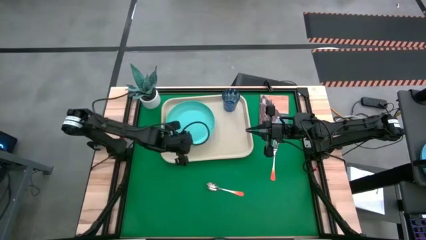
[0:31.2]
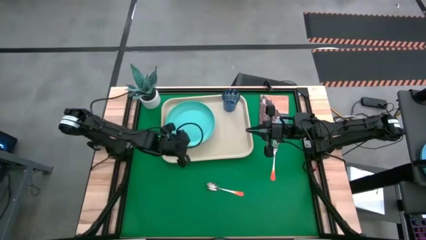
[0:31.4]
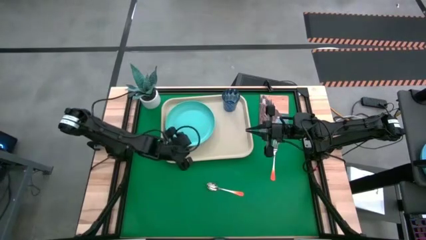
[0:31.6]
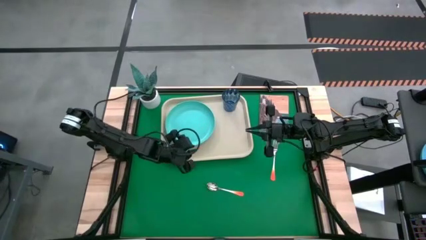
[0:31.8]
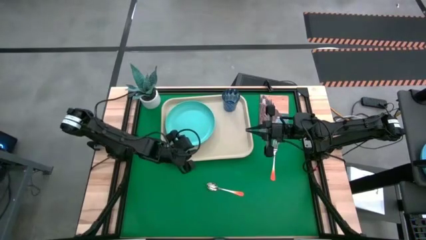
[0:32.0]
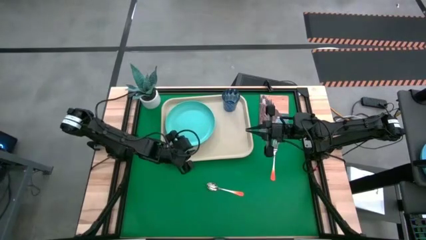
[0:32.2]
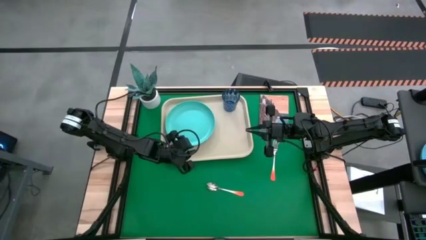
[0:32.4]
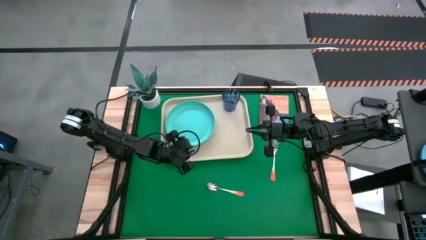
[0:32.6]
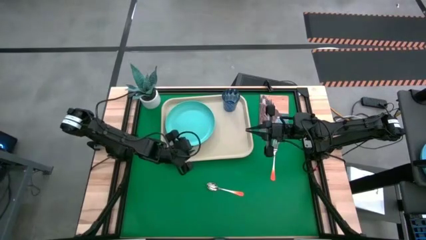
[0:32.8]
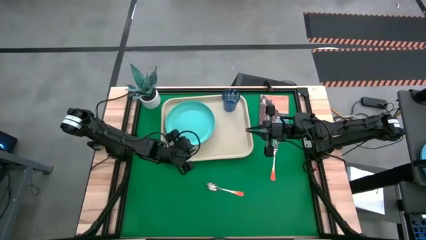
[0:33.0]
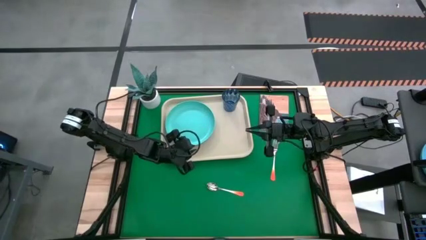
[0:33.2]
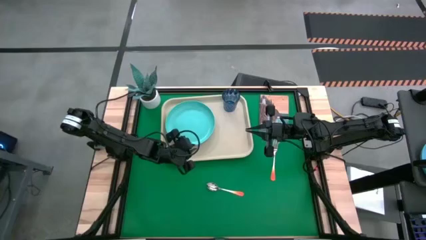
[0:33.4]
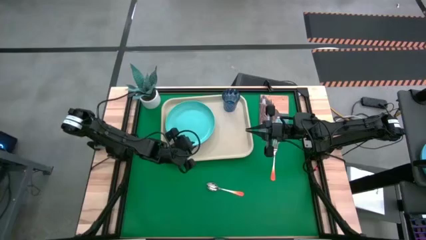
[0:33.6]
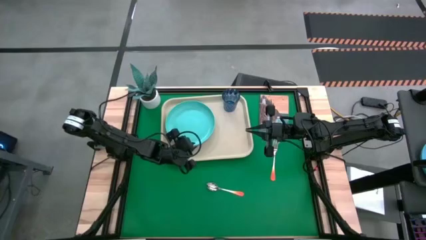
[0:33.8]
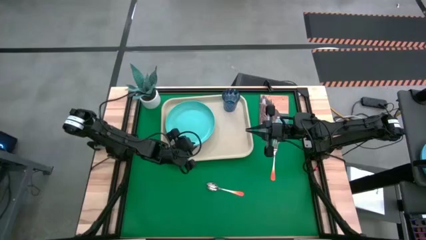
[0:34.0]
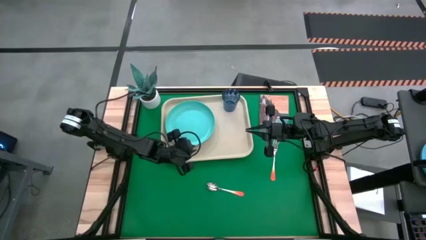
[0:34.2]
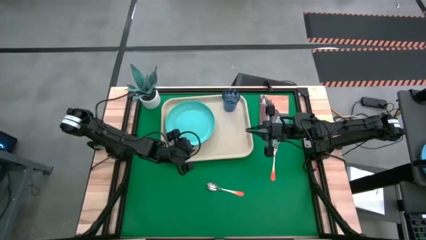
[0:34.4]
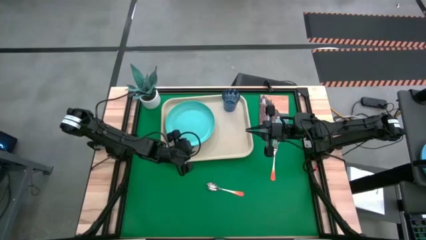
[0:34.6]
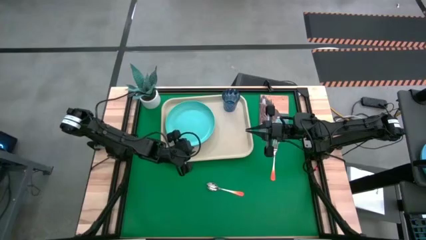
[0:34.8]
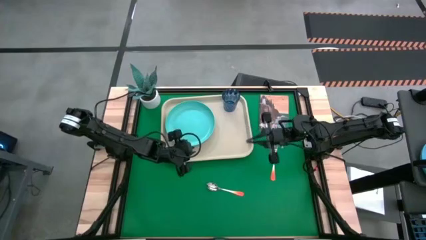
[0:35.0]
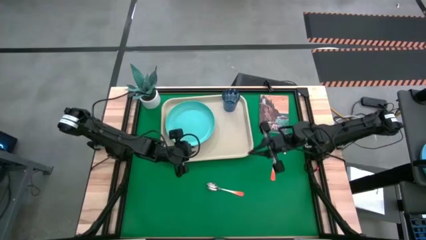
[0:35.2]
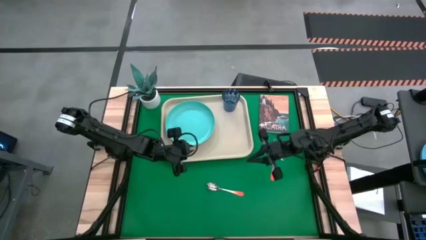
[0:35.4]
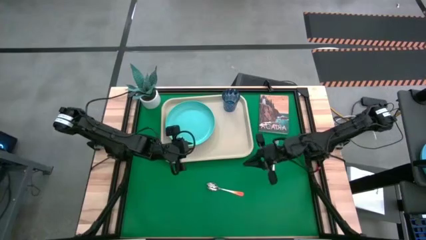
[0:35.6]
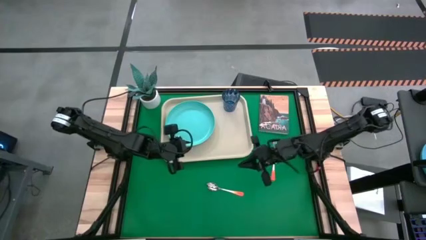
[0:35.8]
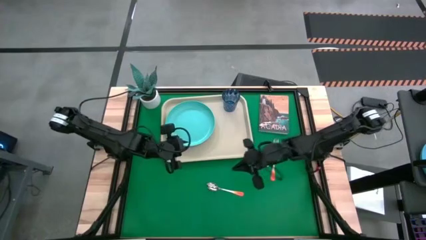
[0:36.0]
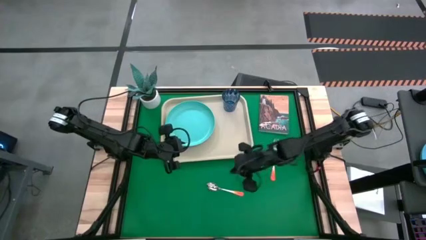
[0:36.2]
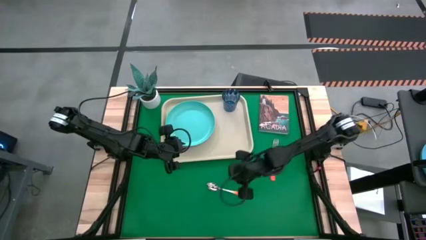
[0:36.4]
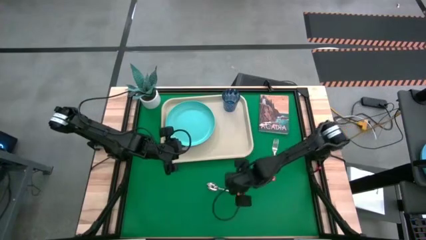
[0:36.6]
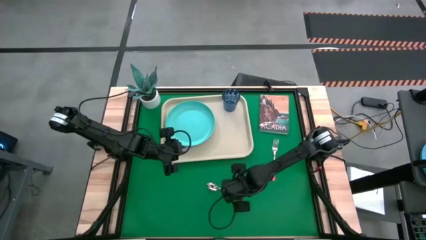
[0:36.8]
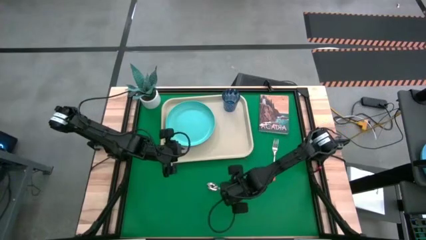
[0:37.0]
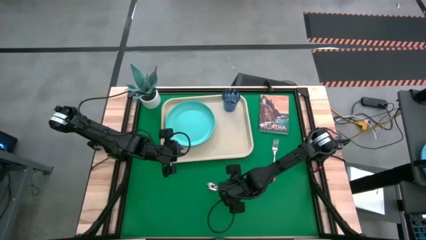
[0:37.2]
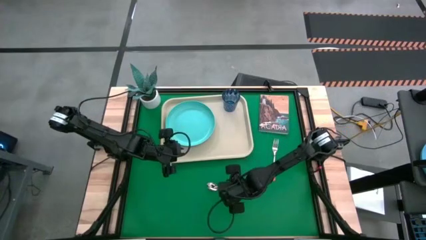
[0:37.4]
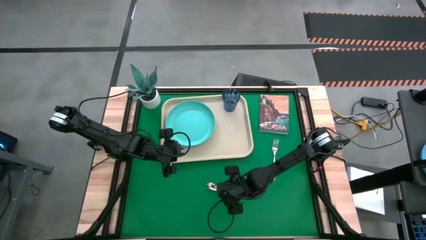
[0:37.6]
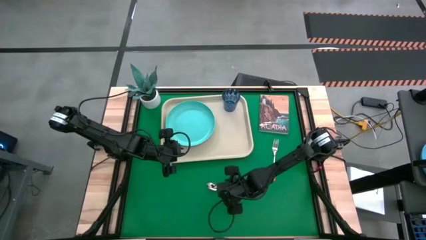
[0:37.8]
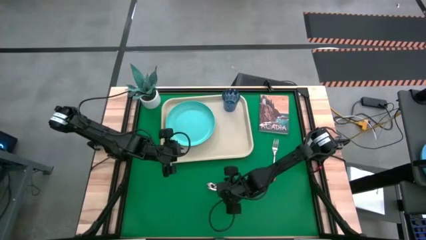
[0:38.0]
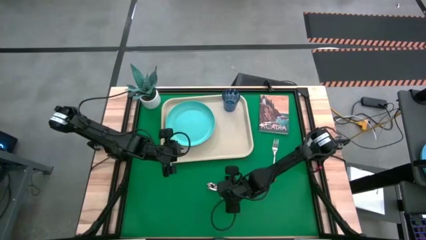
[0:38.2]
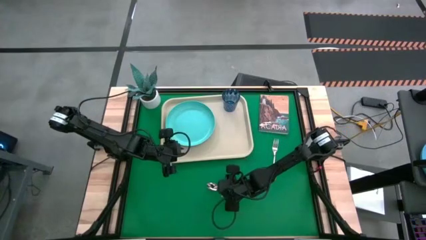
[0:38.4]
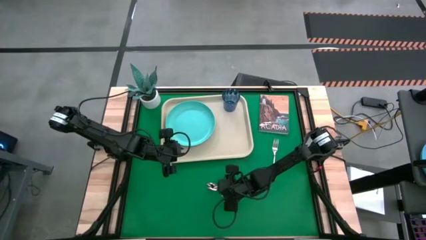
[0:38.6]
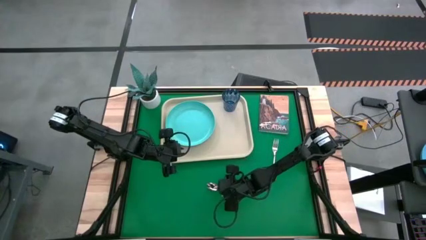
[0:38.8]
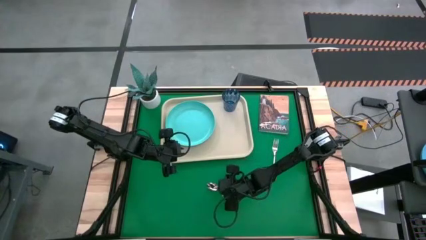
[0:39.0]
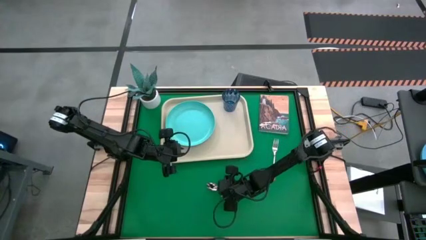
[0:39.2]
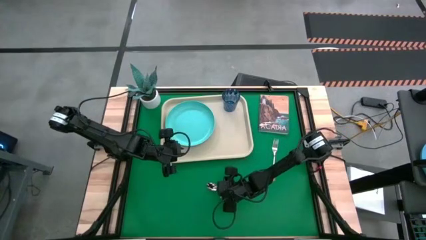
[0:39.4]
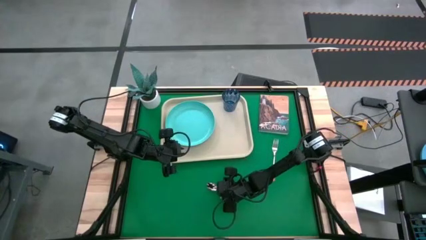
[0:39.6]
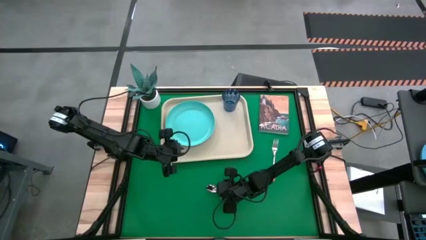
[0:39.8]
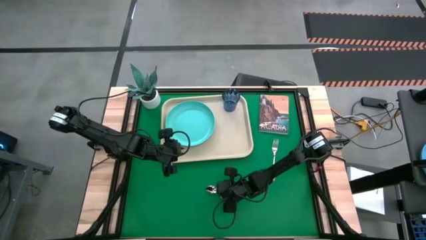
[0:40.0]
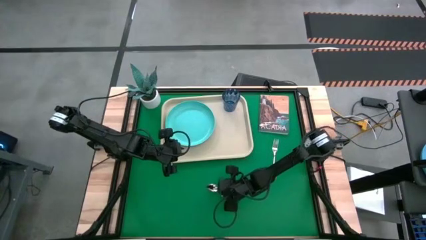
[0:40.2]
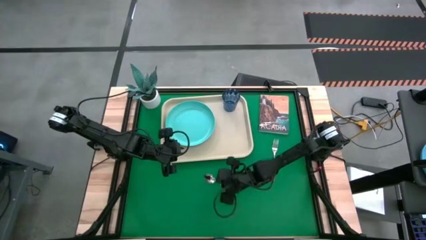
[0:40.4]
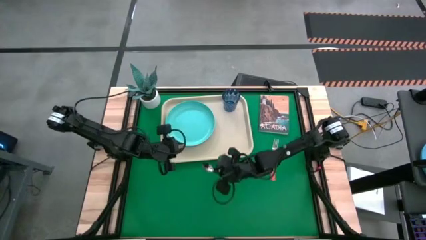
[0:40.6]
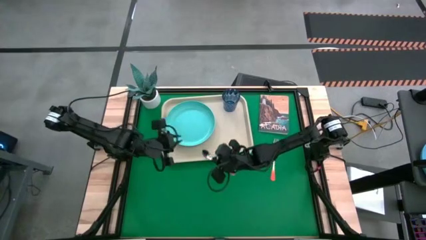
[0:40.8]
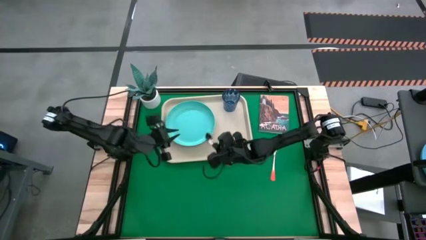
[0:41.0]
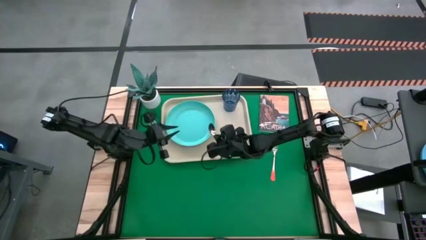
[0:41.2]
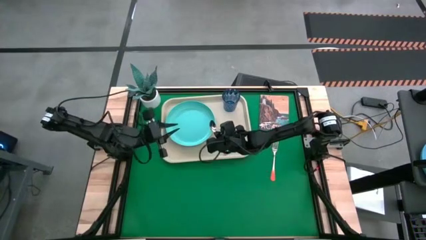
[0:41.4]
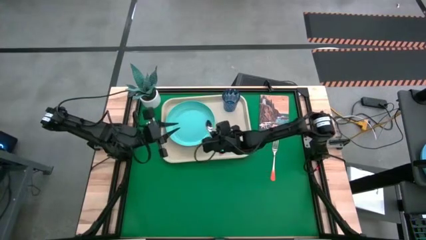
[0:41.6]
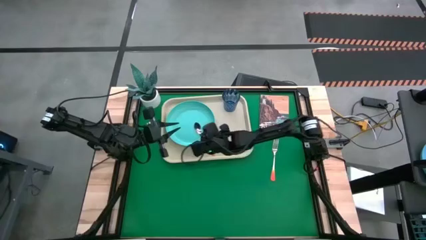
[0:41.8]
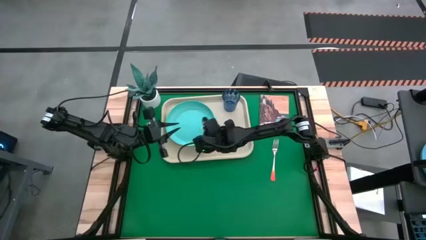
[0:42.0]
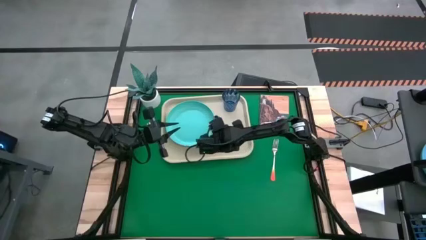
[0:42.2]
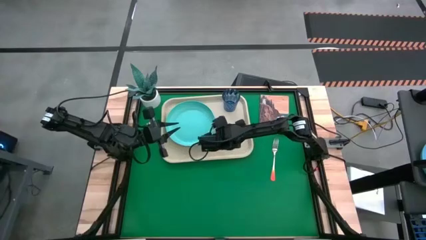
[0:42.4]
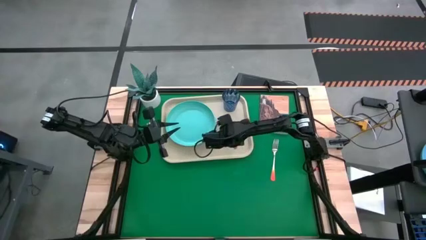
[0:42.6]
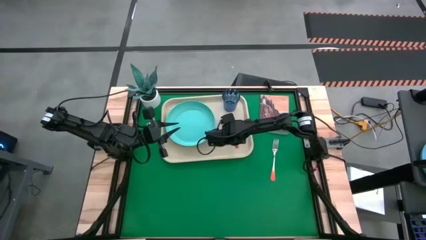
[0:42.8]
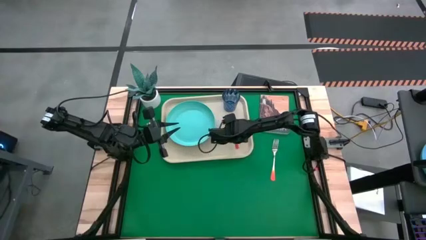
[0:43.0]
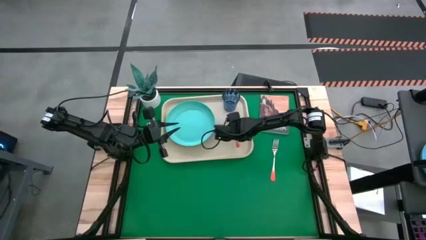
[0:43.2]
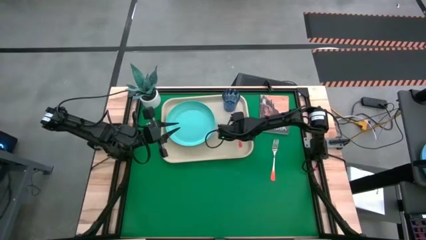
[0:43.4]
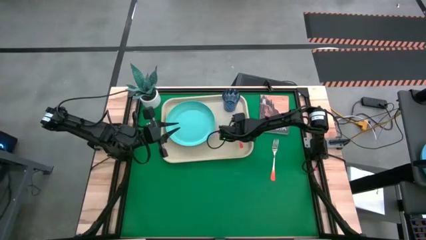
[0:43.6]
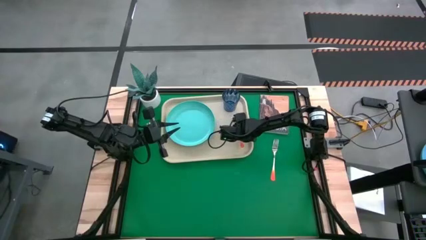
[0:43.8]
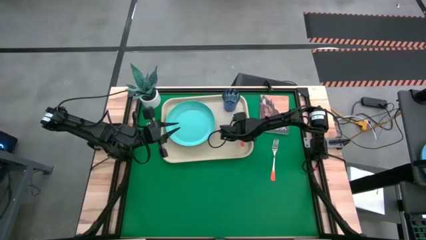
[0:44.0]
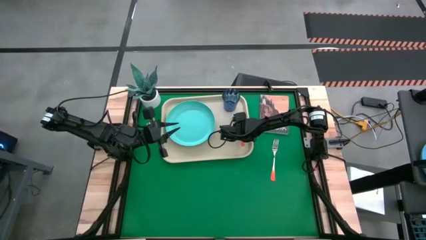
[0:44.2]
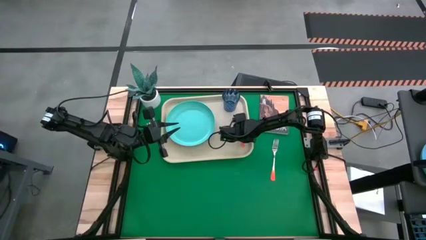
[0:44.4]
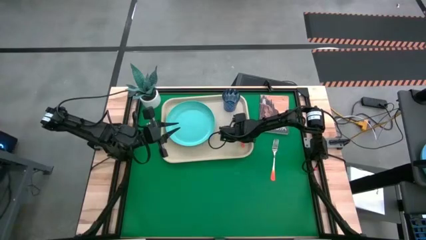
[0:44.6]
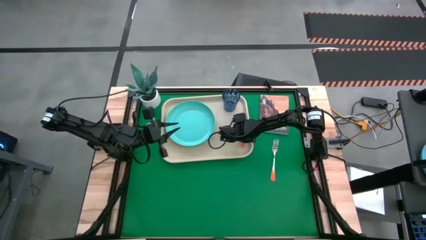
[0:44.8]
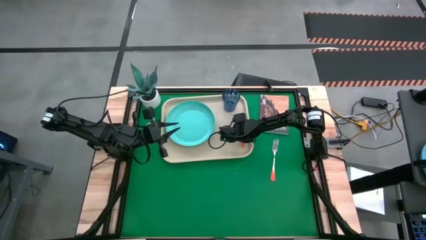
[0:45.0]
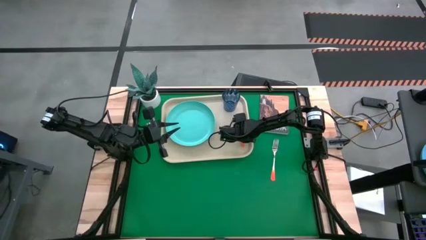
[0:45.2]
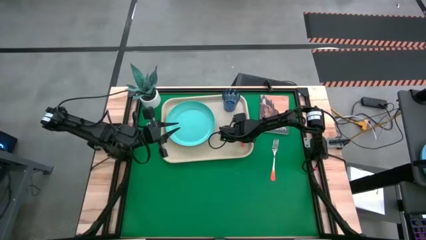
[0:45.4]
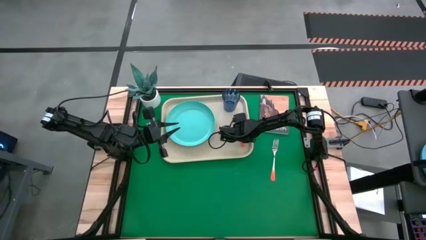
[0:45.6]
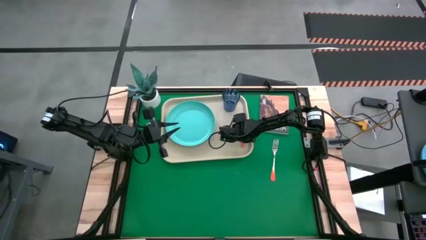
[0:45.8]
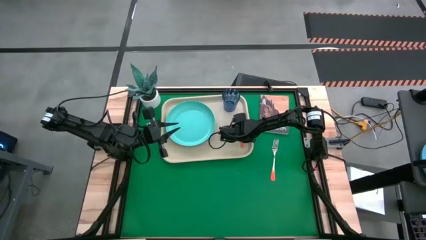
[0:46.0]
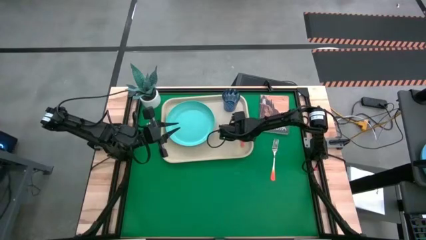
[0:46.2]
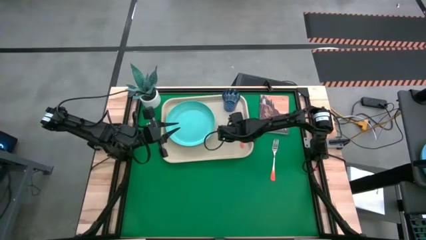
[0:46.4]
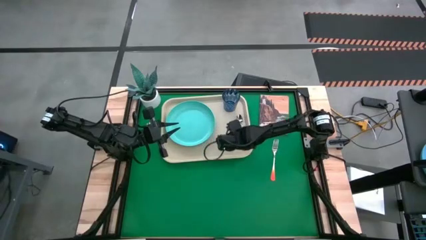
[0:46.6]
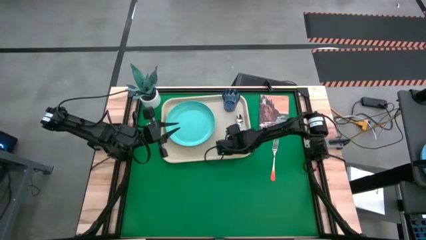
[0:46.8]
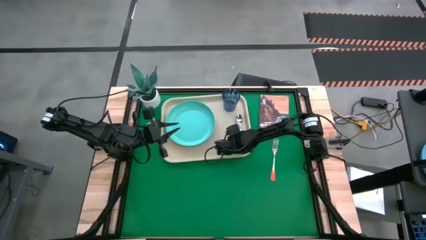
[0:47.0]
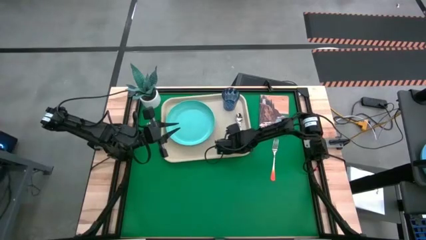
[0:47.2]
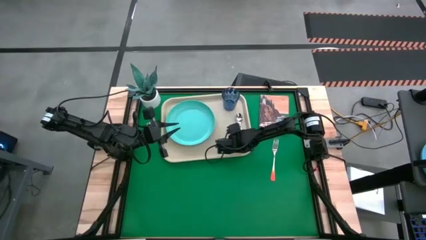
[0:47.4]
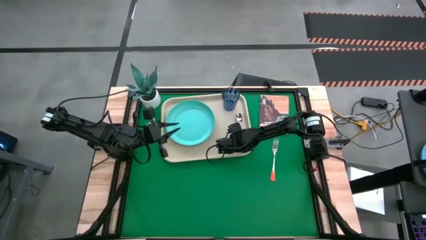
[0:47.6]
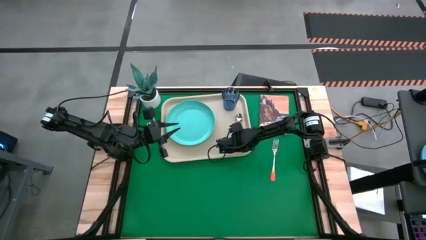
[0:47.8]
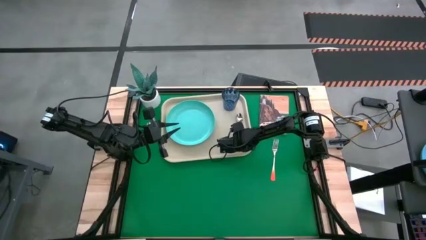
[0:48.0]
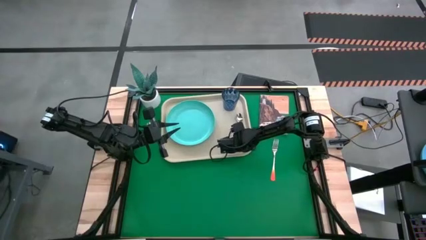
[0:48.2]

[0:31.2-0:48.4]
Task: Pick and place plate/cup/fork/spoon on tray
Put the orange spoon on the light brown serving tray to the bottom of the blue cup
